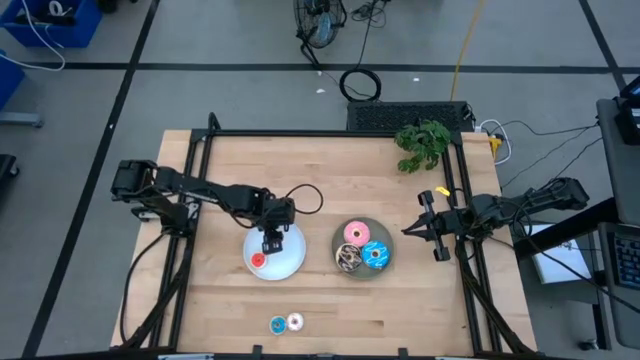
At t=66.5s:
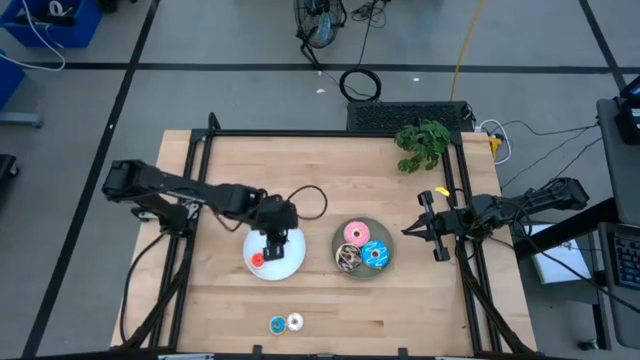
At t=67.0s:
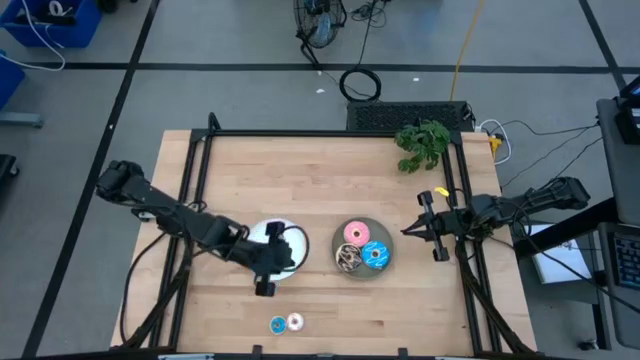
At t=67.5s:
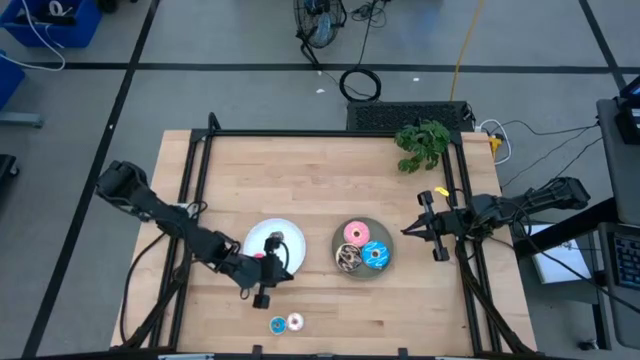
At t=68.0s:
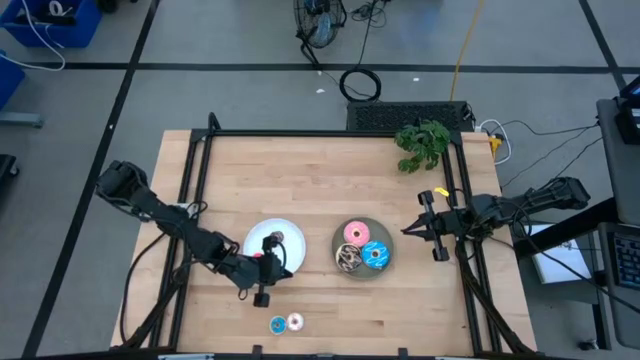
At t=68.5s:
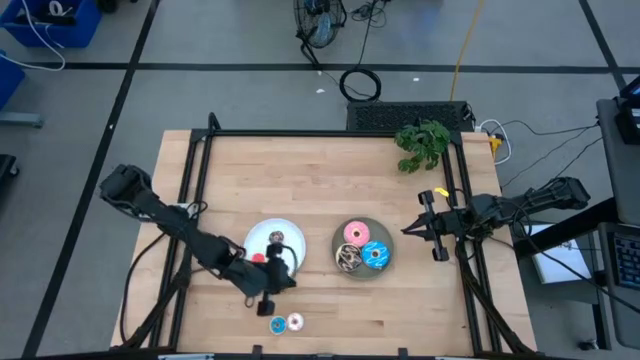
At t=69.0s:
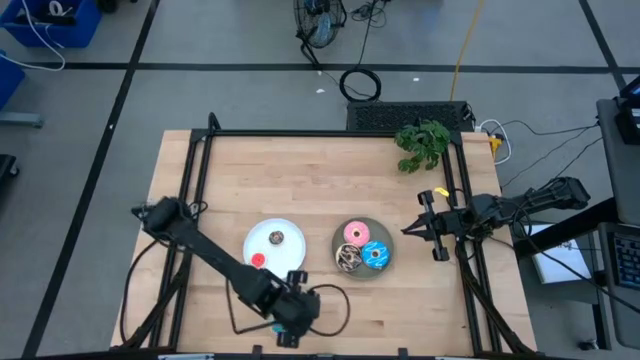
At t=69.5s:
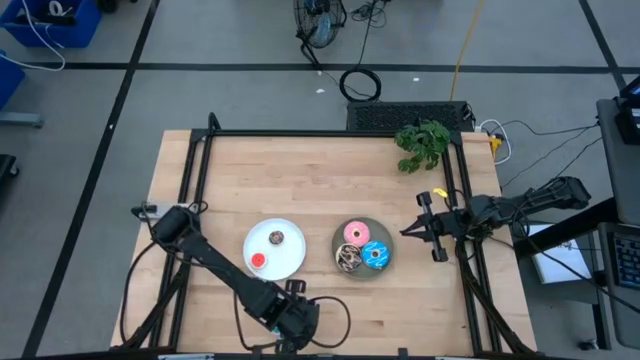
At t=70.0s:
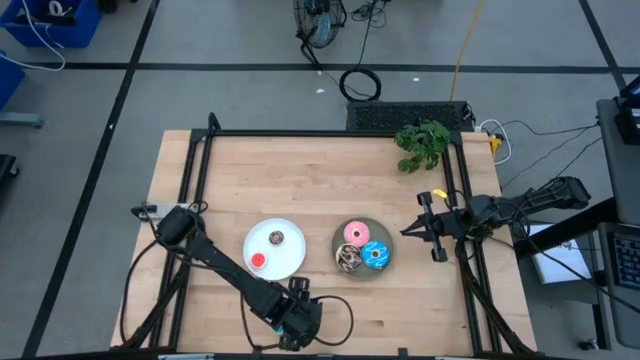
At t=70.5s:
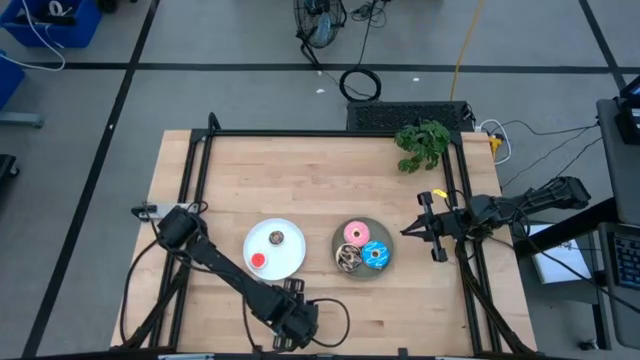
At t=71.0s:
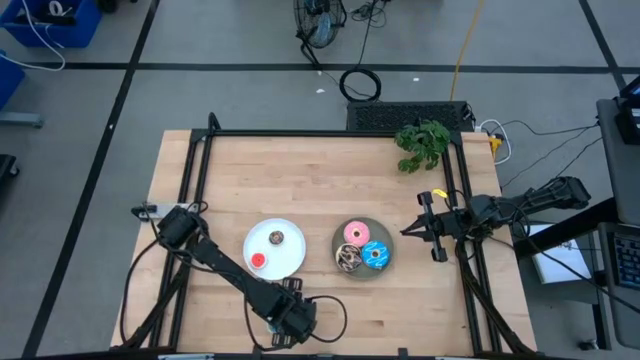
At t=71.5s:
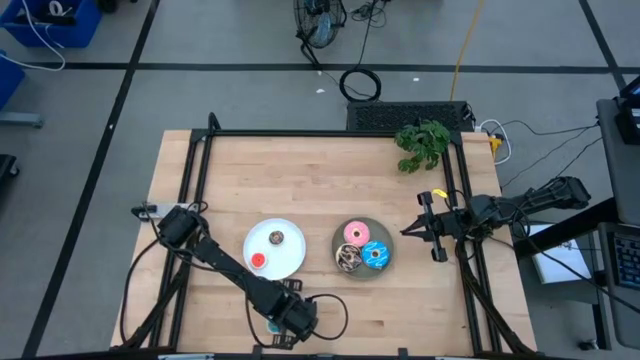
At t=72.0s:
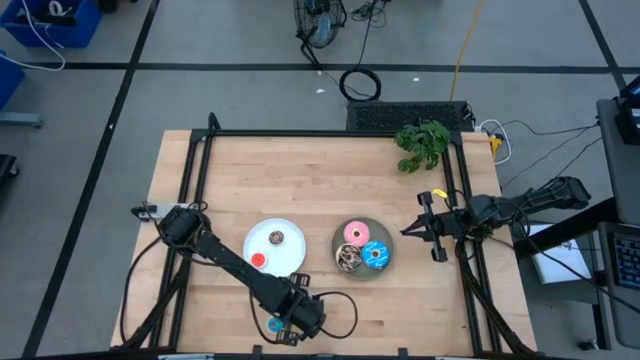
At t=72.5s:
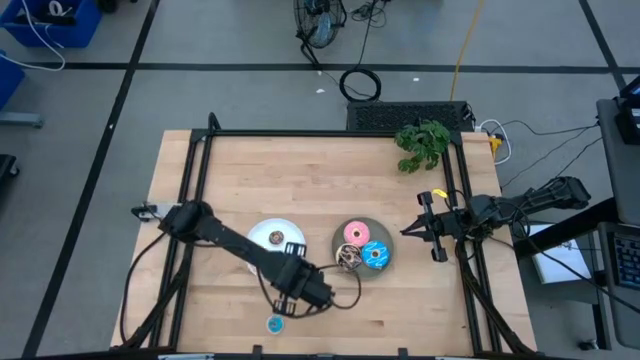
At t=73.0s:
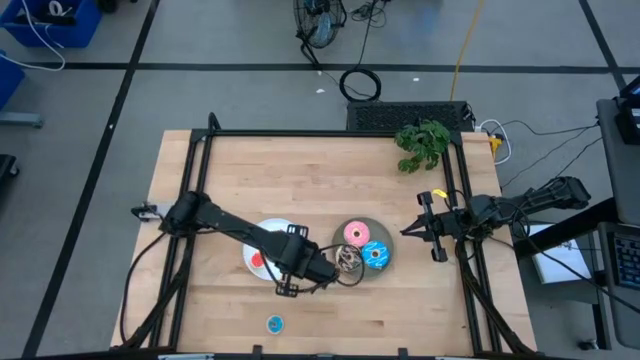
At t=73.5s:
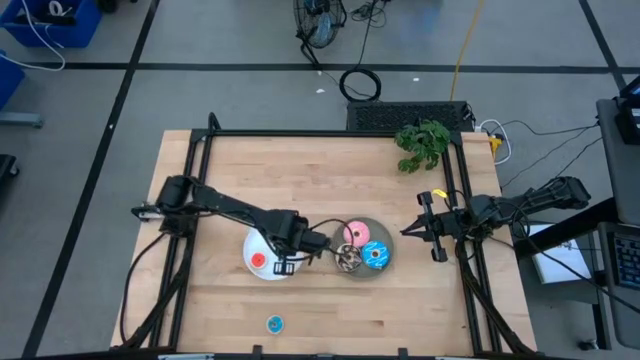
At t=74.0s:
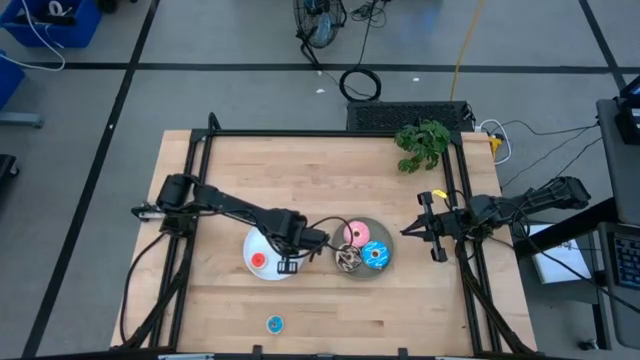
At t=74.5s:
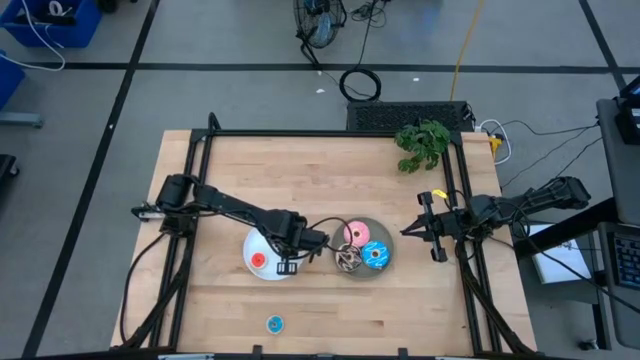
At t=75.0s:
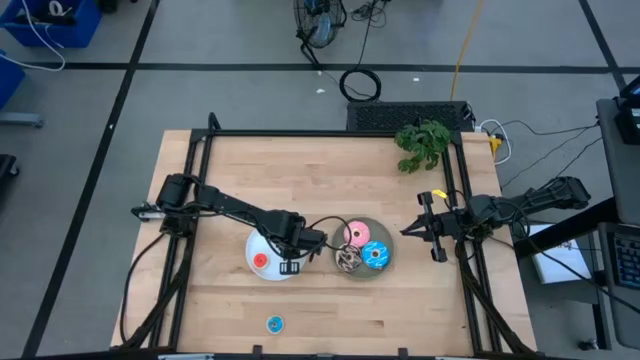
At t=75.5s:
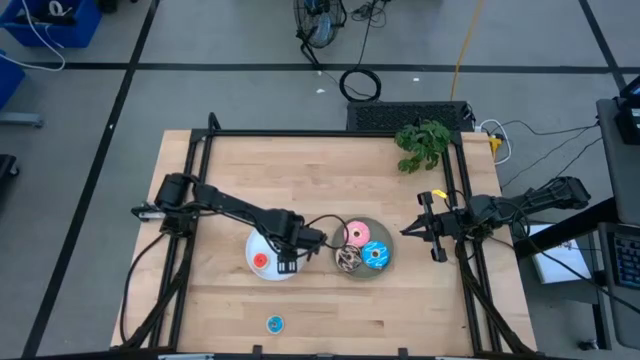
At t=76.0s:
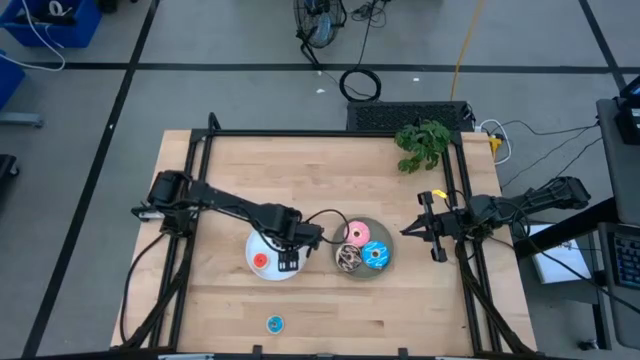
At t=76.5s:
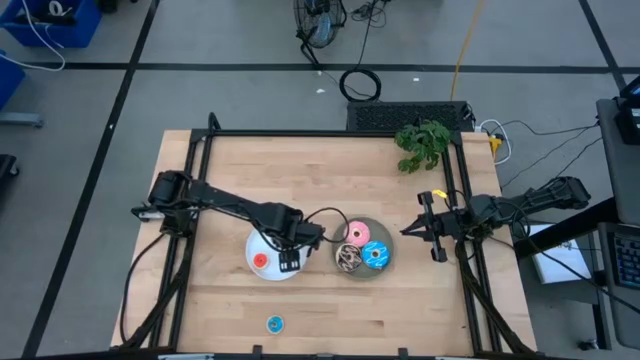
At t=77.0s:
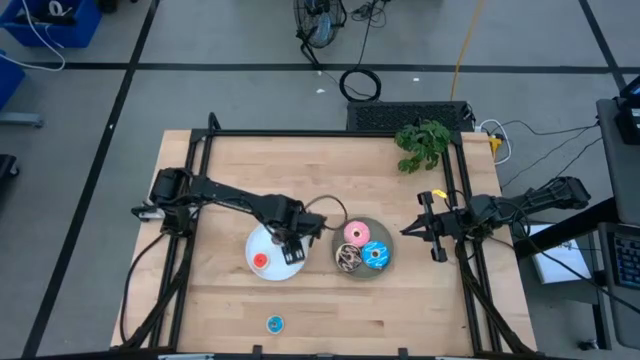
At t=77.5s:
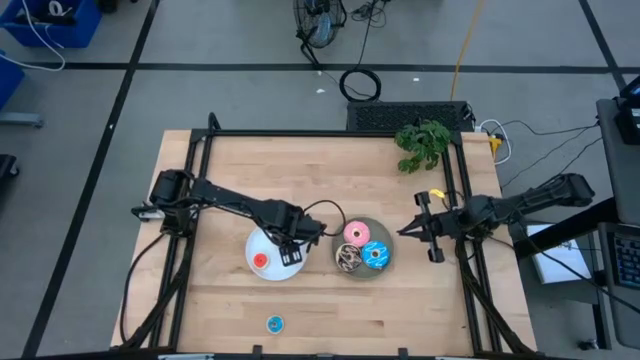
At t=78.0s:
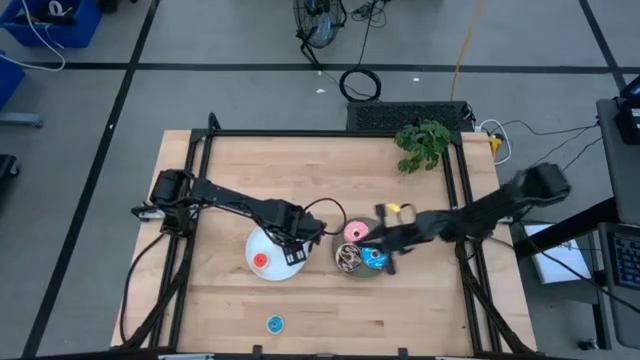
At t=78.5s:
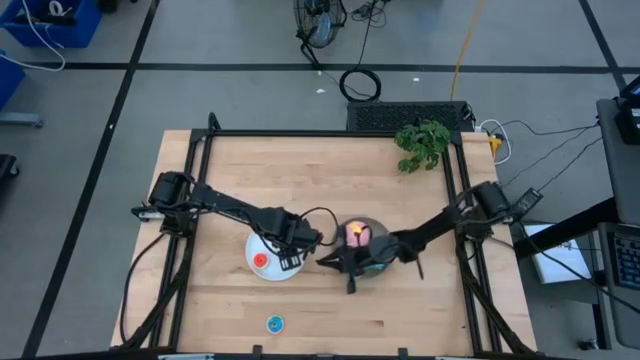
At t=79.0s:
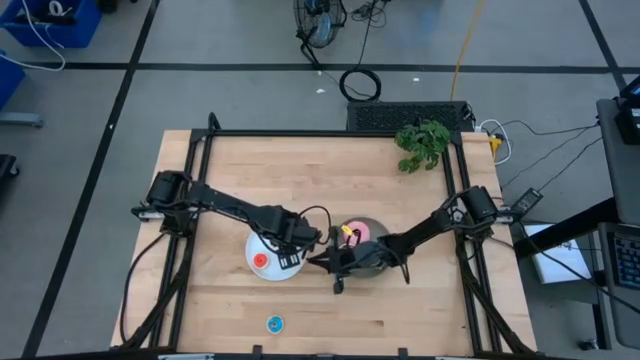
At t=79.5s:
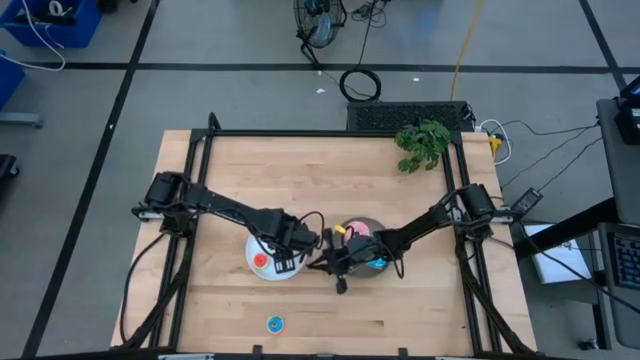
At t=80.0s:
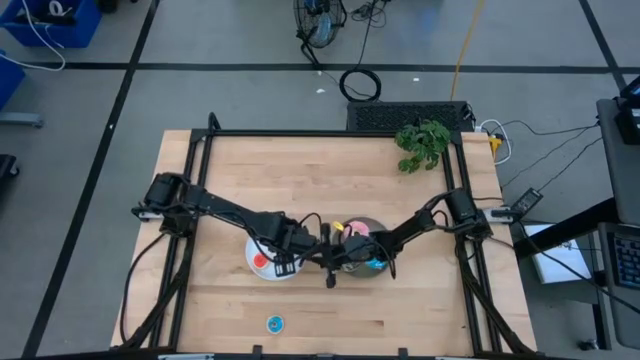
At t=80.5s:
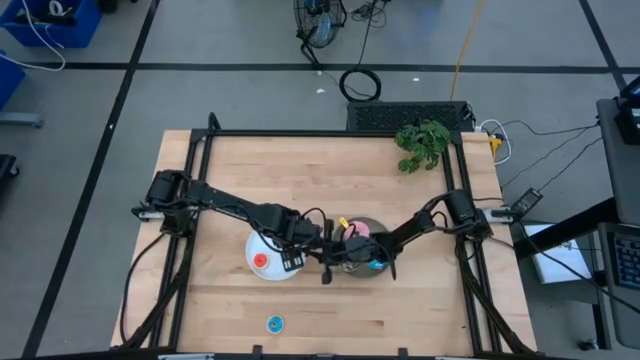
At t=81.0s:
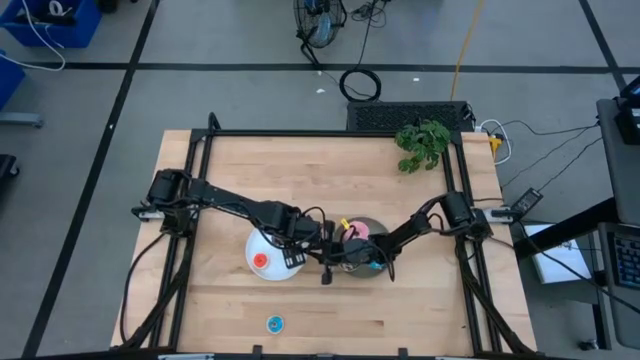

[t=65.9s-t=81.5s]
Task: Pick & Place donuts
Put the small white donut on the white plate

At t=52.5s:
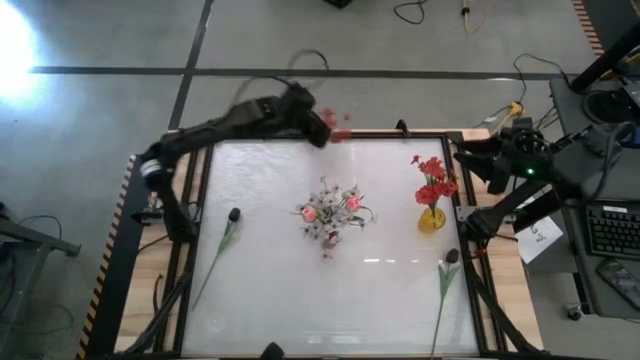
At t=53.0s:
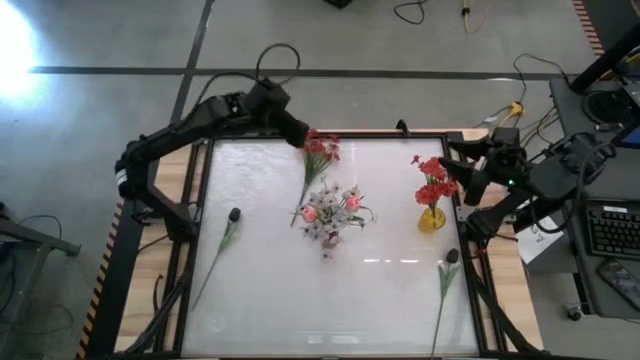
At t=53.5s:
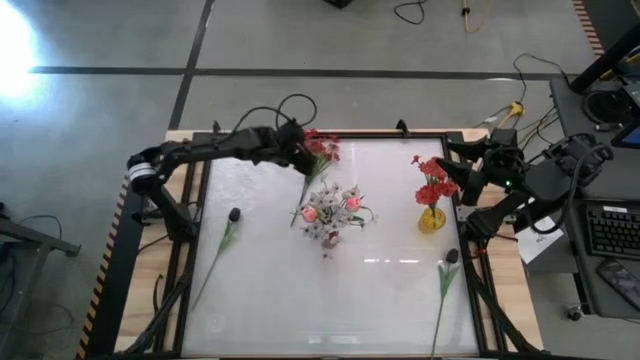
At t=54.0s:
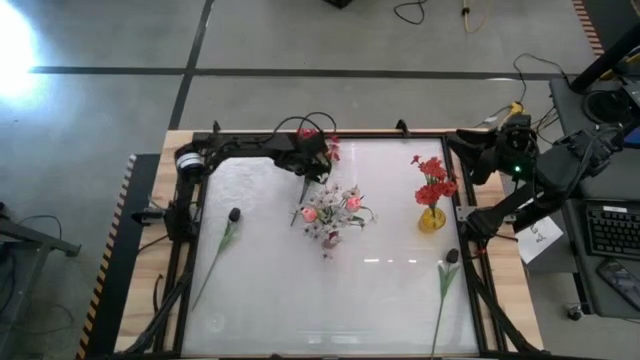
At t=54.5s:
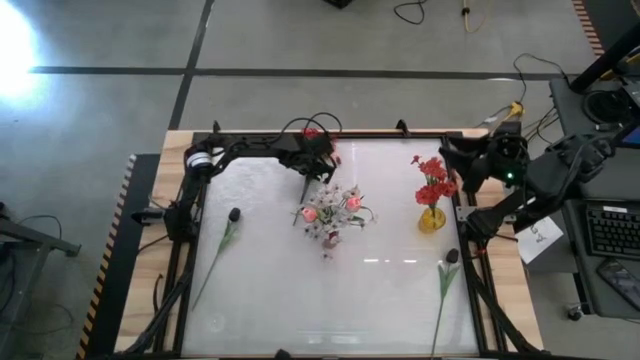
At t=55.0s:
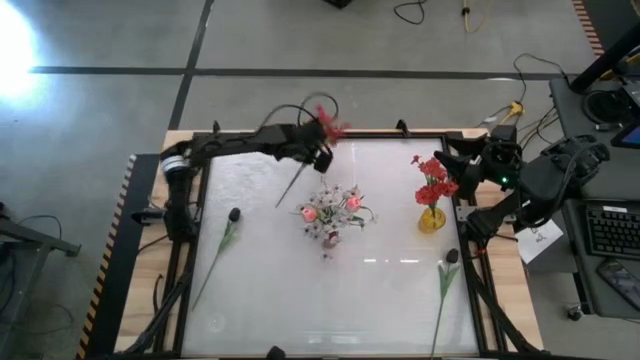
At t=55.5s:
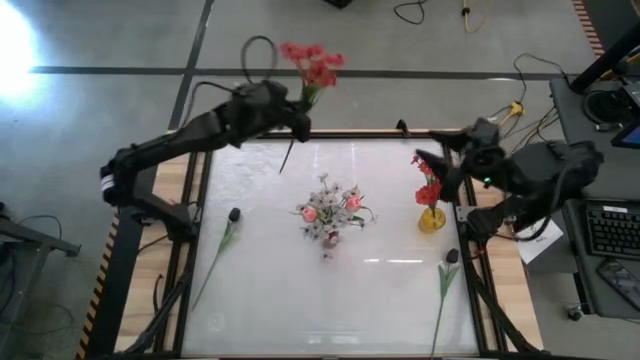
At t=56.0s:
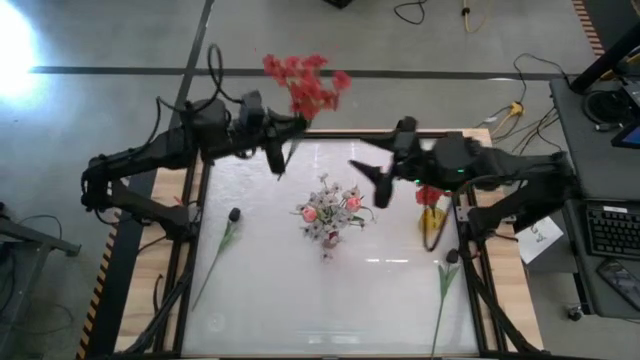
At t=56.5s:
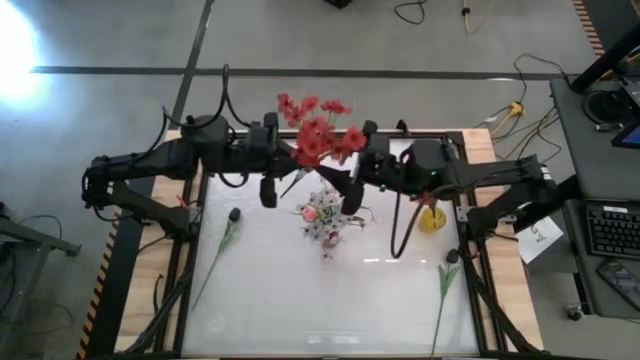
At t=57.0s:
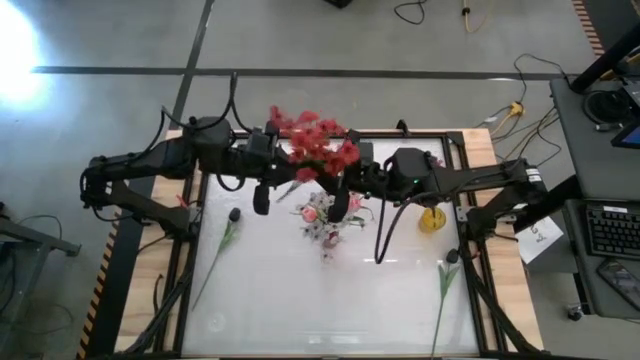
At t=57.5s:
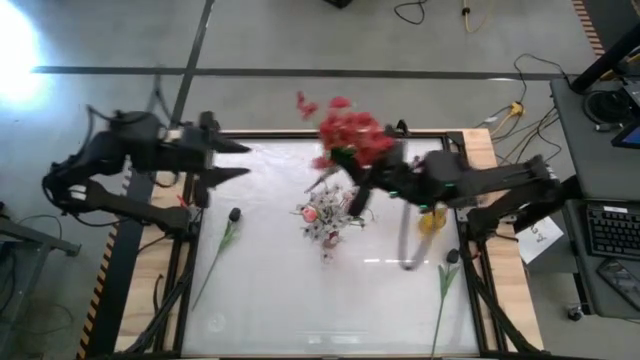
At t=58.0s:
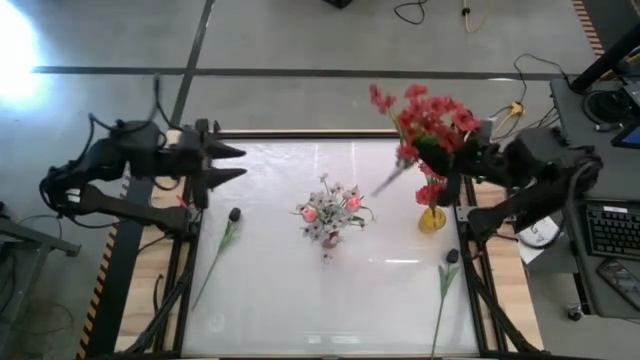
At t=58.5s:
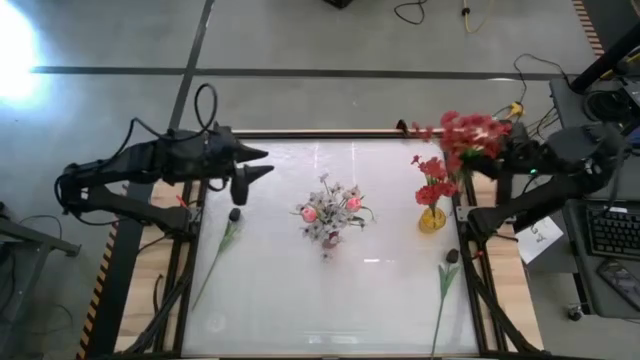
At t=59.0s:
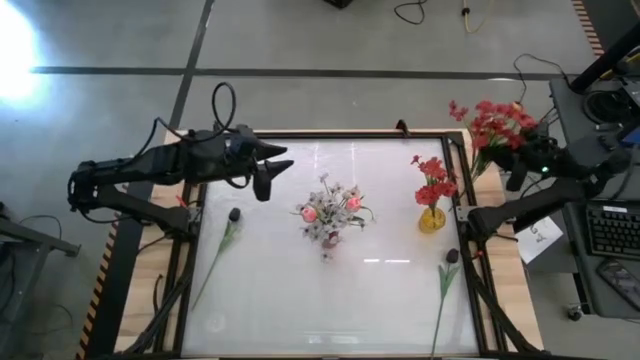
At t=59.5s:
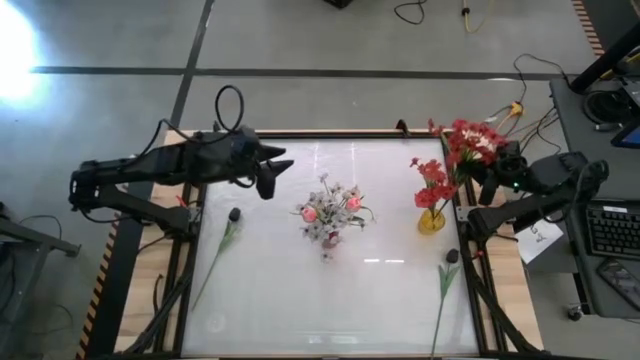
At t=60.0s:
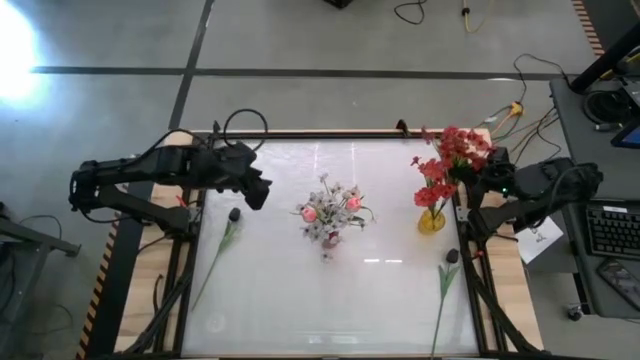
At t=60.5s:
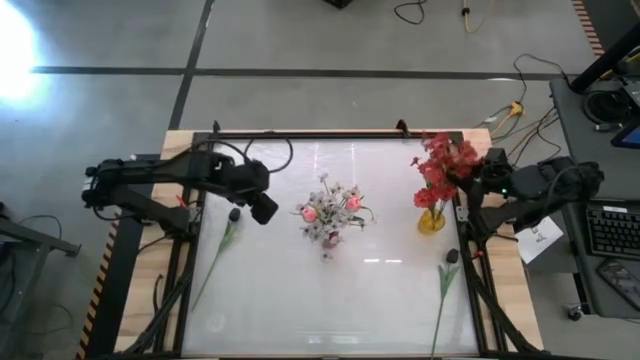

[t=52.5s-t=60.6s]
Task: Sort flowers into vase by color
Put the red flowers into the yellow vase
